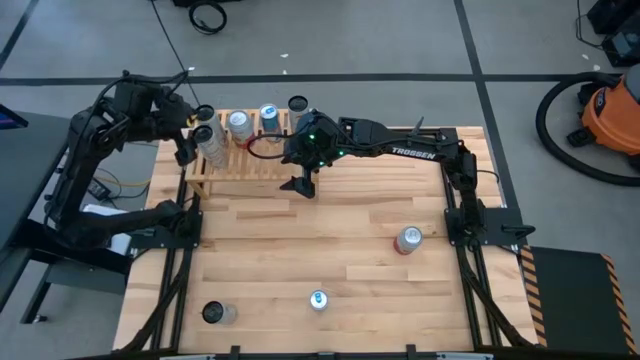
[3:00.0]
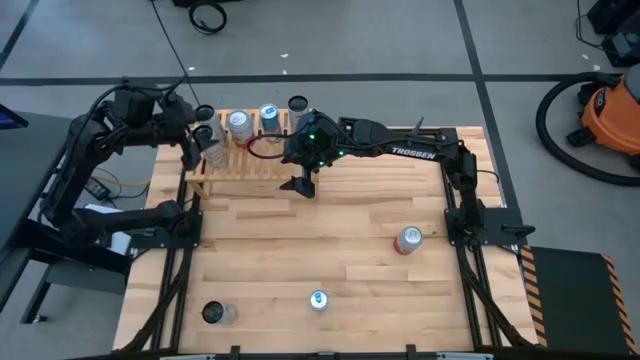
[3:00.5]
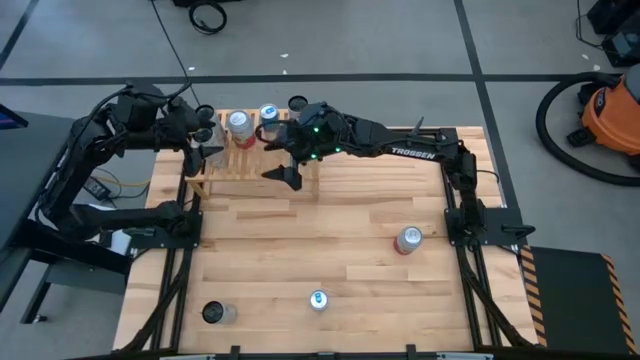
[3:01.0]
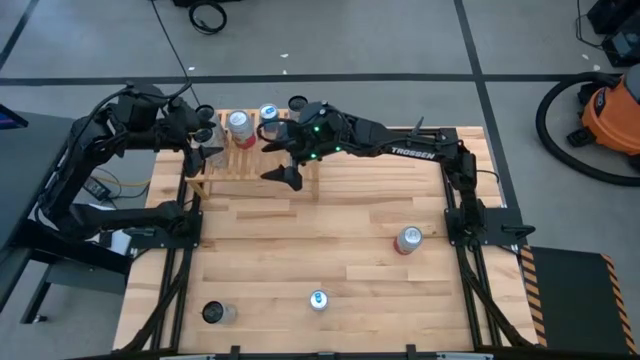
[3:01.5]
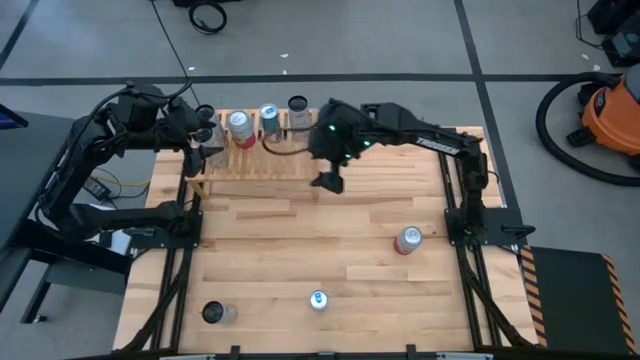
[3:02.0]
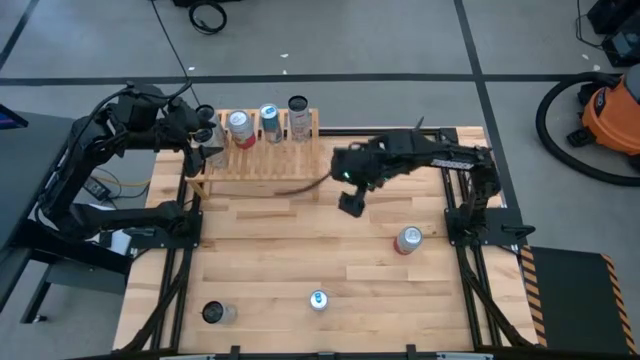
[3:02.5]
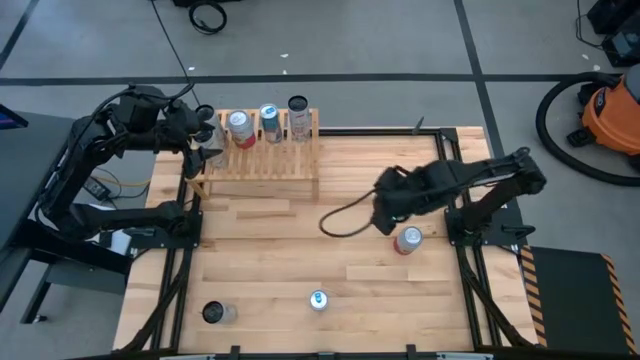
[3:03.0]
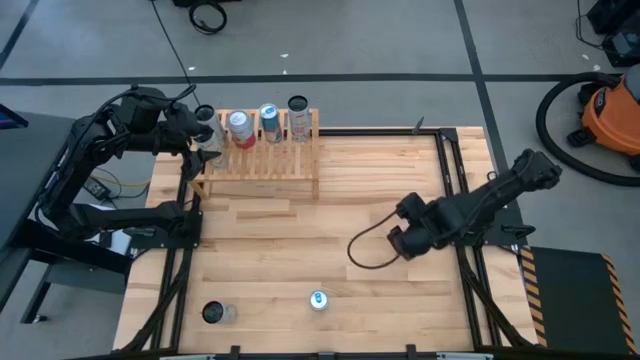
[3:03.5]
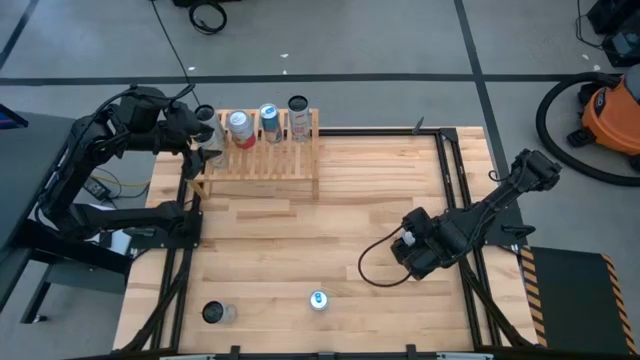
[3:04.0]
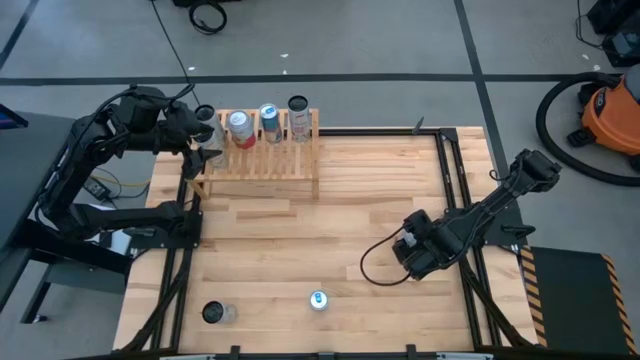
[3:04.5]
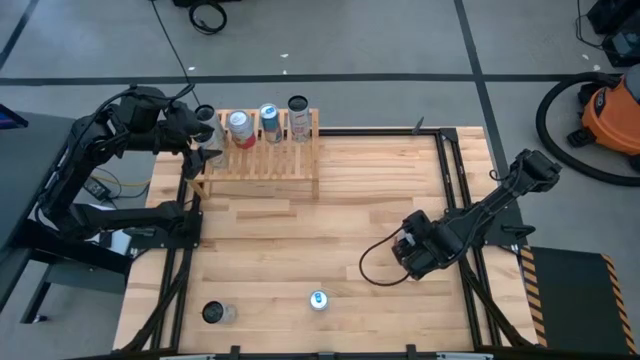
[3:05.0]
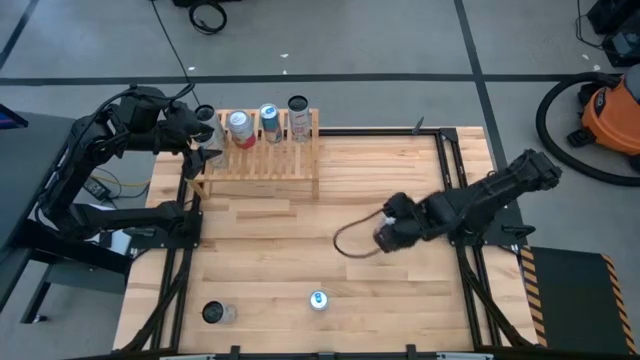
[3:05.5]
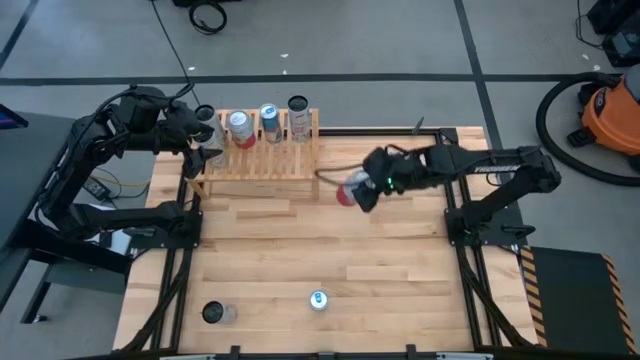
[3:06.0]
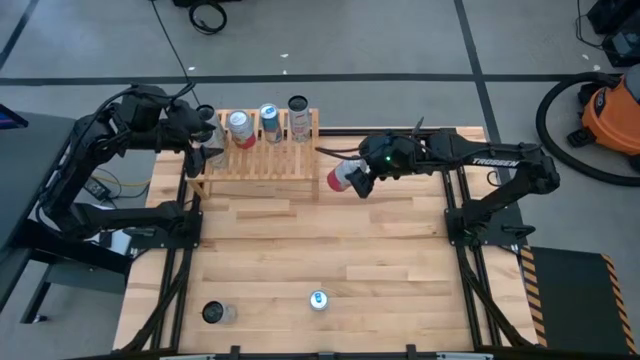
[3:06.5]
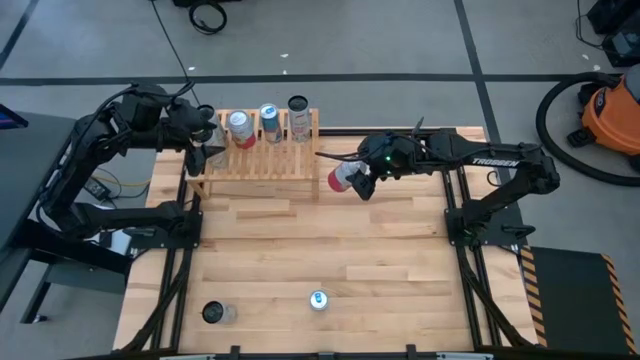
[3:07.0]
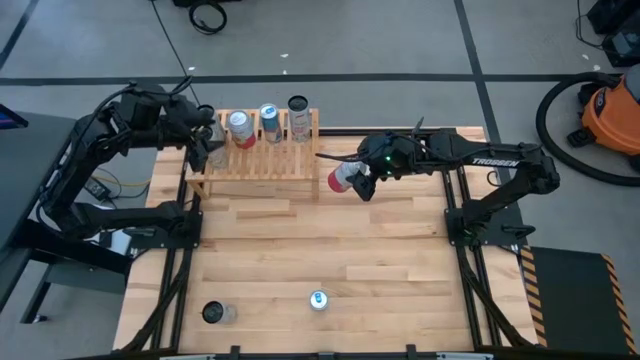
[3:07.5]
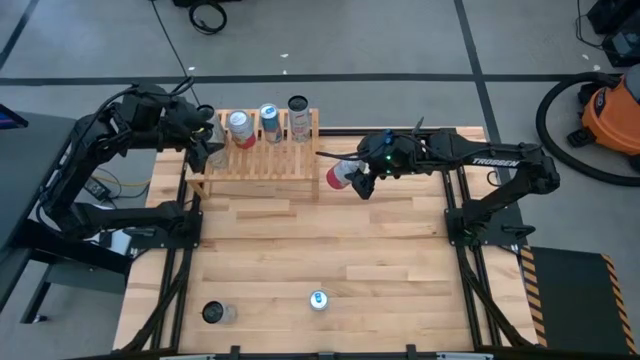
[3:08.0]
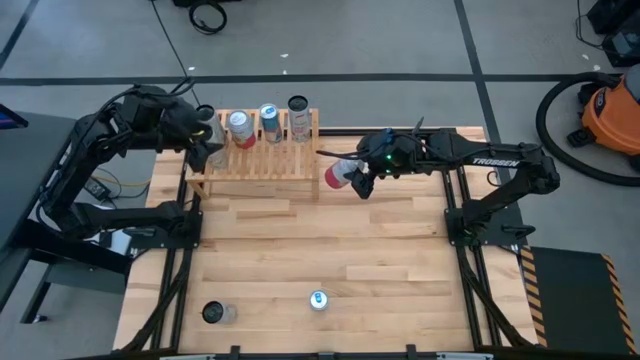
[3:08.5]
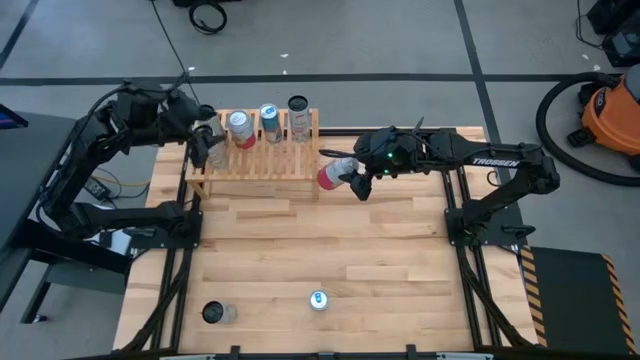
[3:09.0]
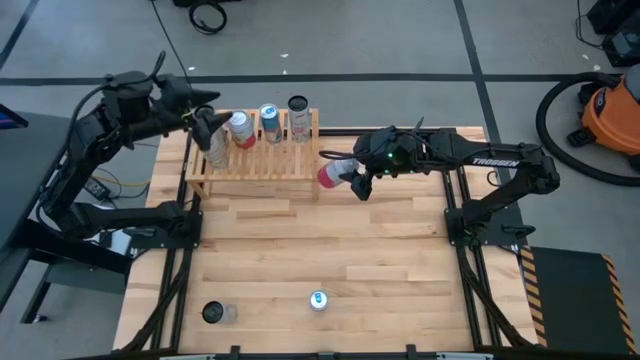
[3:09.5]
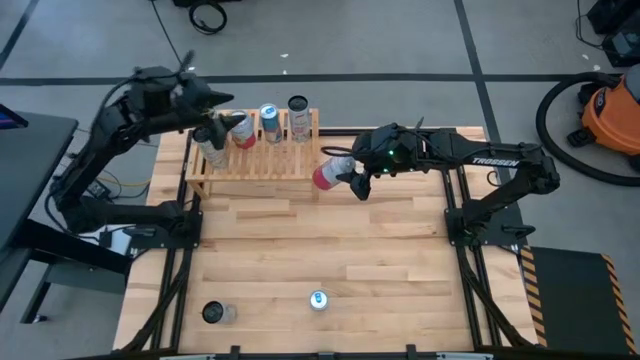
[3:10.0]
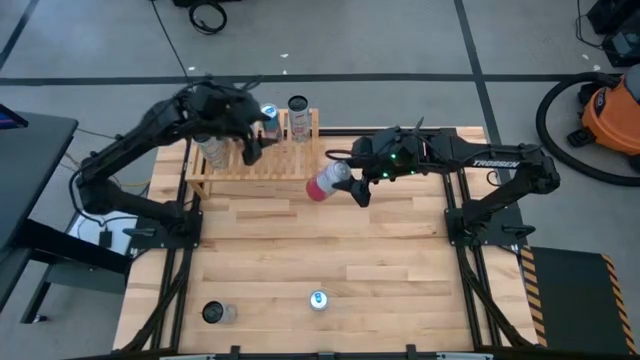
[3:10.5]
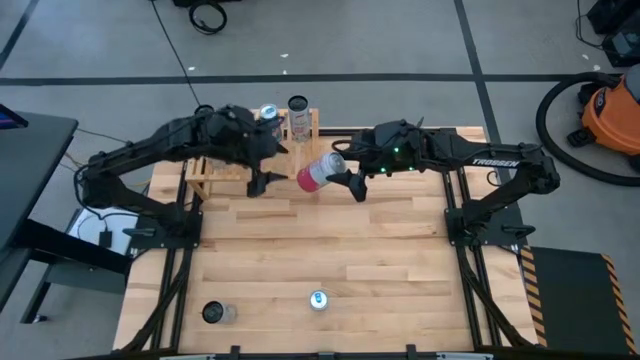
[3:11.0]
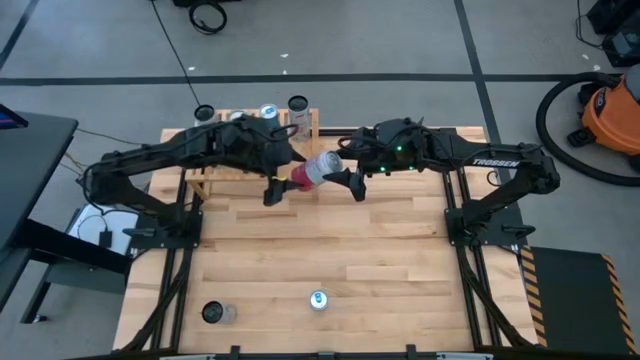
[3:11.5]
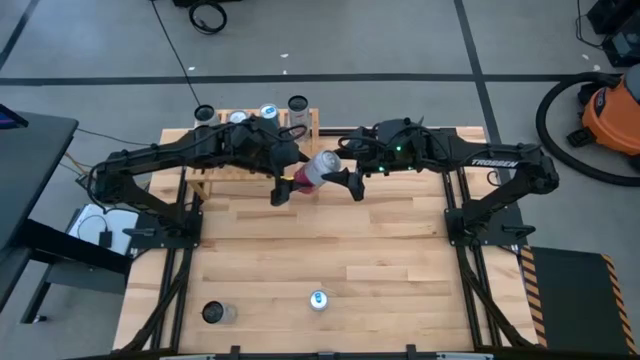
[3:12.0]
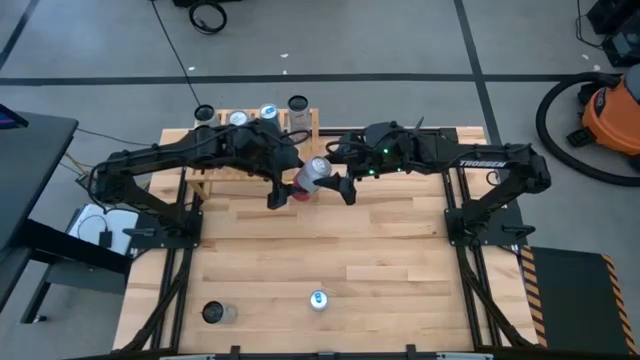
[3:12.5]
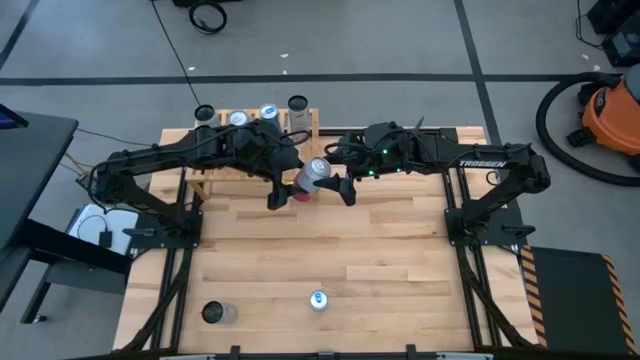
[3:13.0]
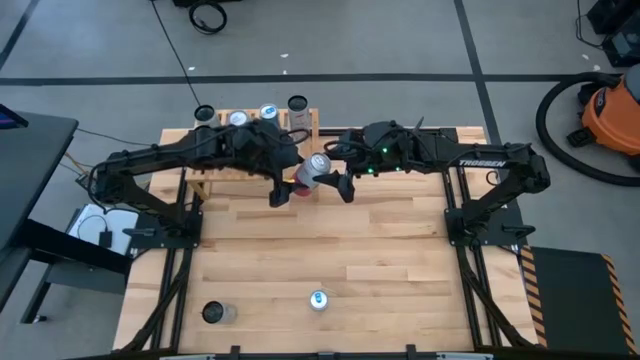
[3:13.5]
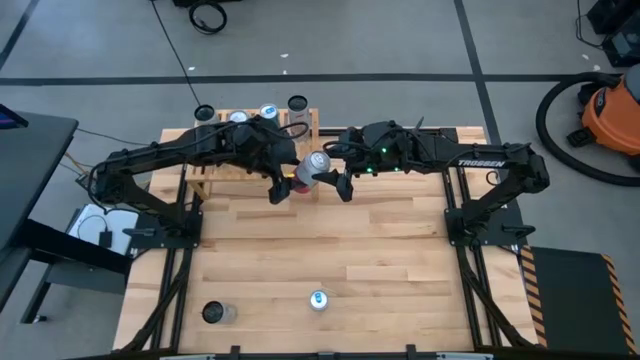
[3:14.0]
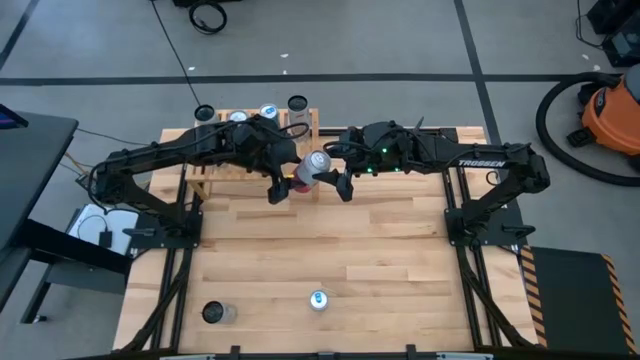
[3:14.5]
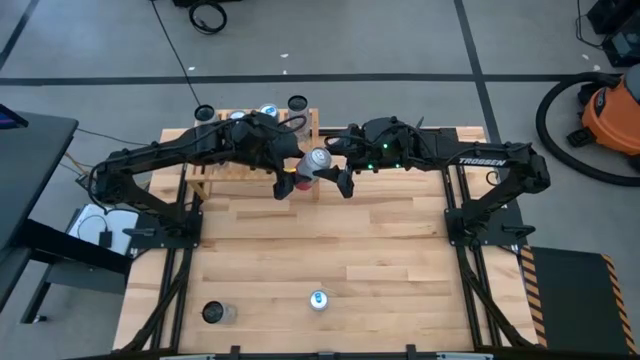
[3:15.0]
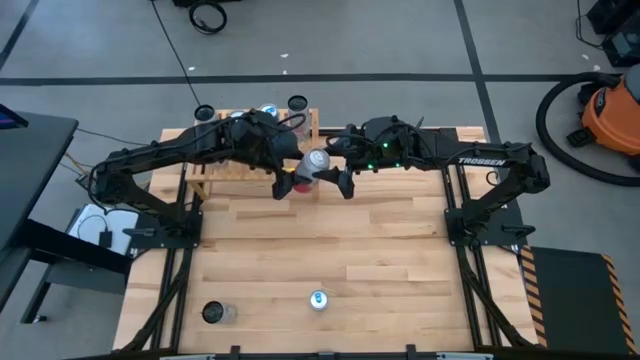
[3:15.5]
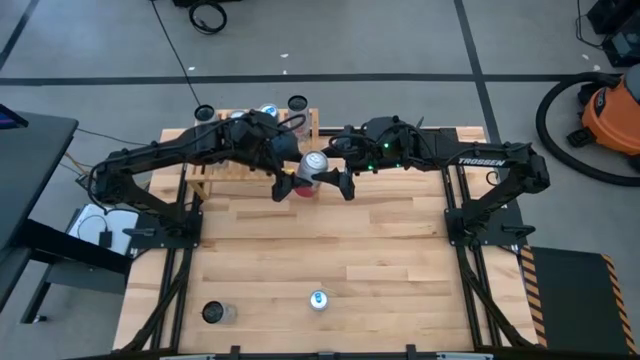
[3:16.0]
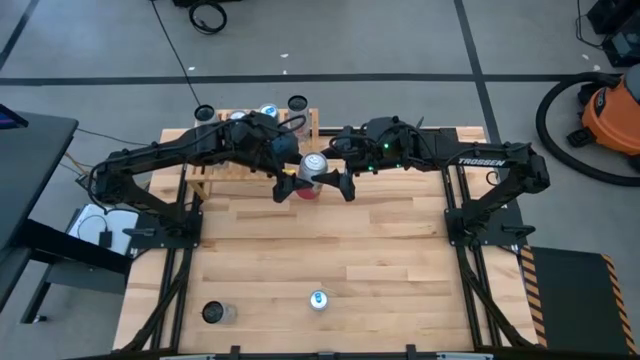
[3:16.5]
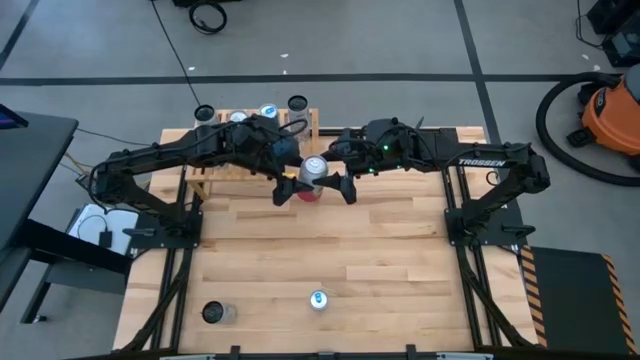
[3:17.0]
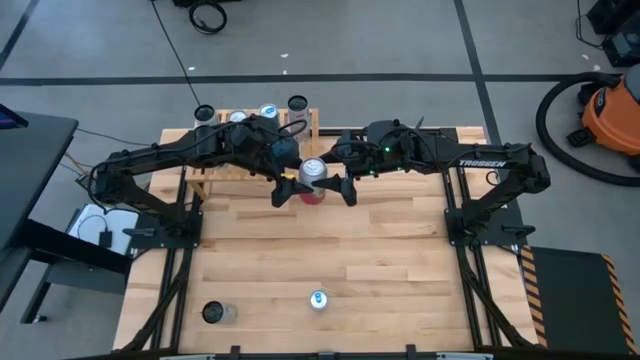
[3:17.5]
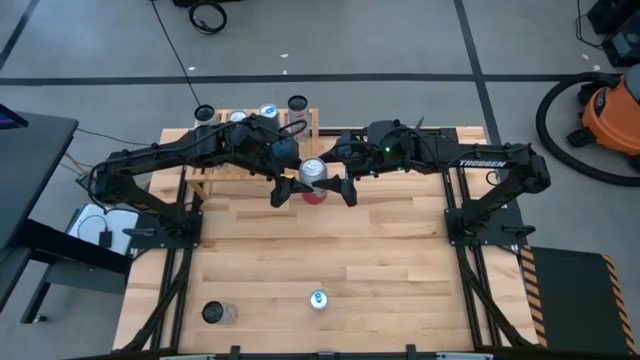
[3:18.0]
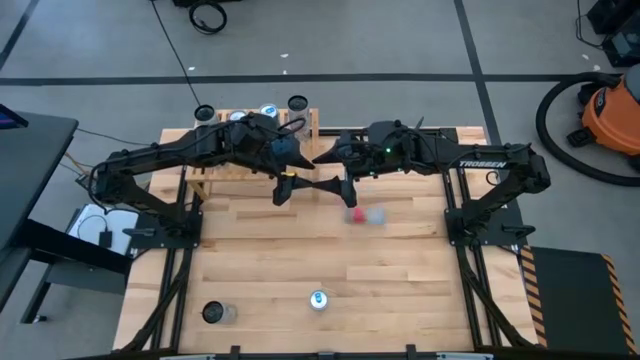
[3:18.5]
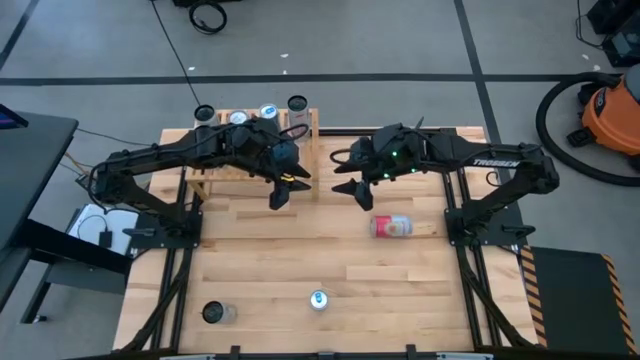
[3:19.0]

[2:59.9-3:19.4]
Task: Place canned beverage on shelf
Put the pink white soda can on the shelf aligned with the other pink white soda can

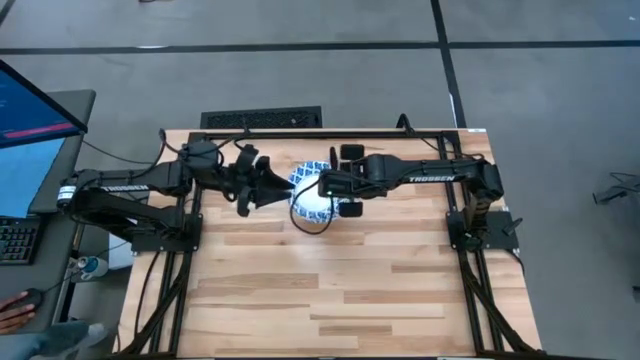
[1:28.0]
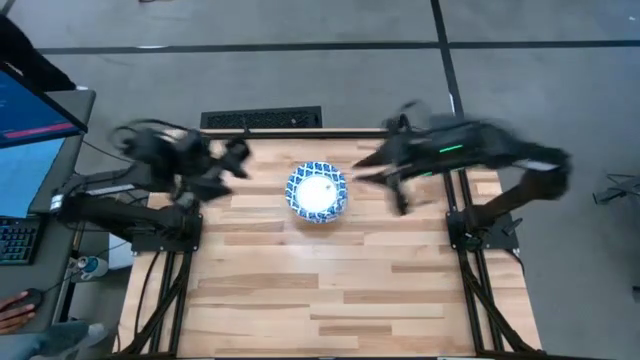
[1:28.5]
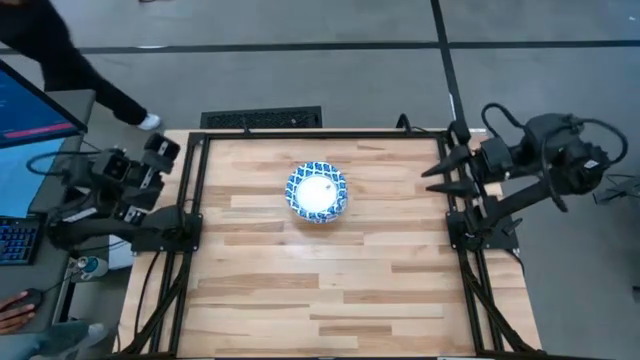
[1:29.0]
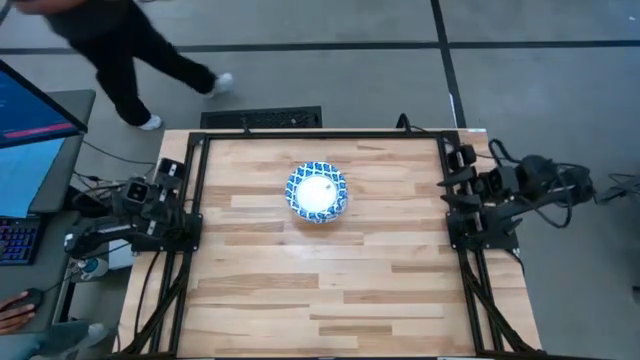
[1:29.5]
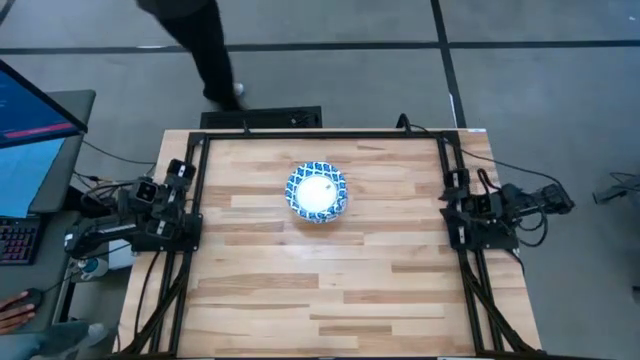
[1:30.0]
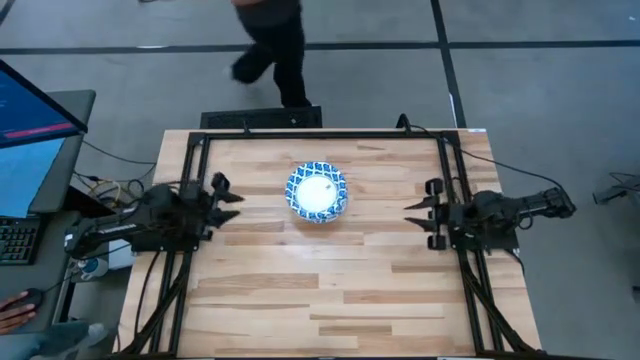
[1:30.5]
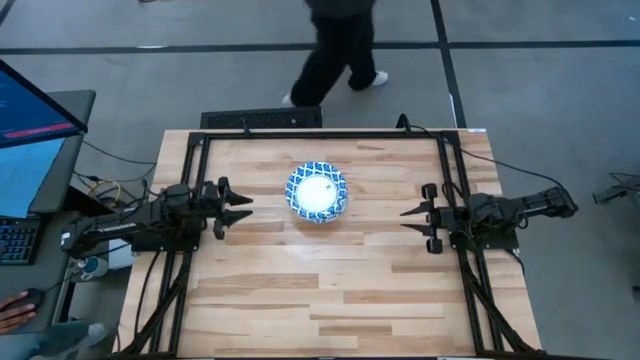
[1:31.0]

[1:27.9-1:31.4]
Task: Nest bowls inside each other
Return to Home Position
